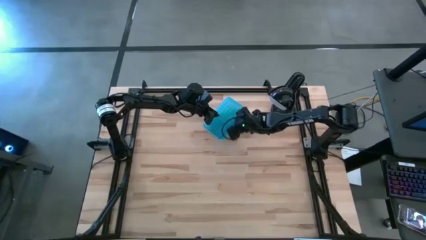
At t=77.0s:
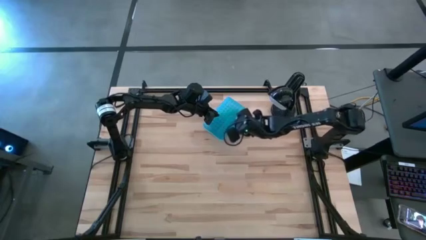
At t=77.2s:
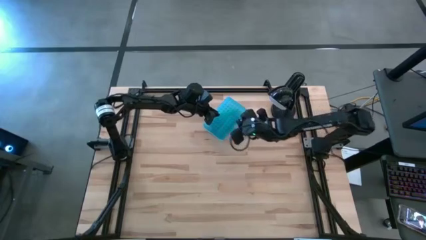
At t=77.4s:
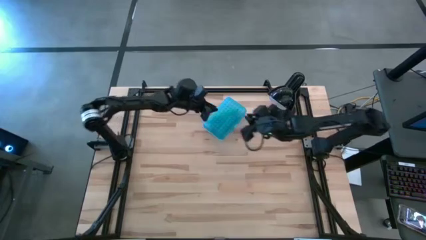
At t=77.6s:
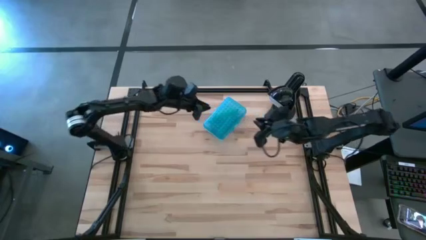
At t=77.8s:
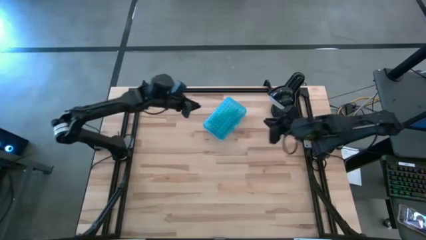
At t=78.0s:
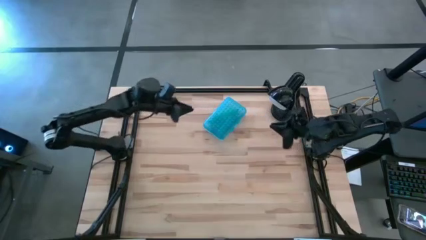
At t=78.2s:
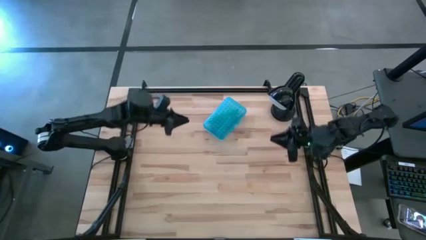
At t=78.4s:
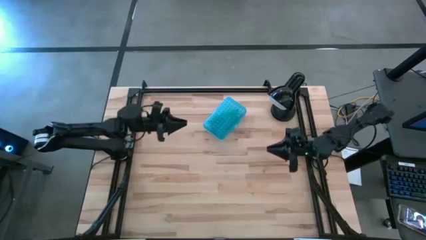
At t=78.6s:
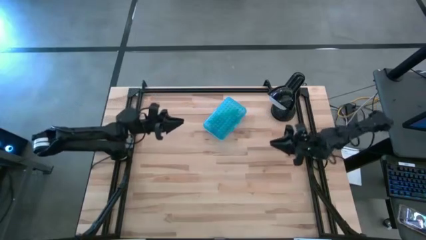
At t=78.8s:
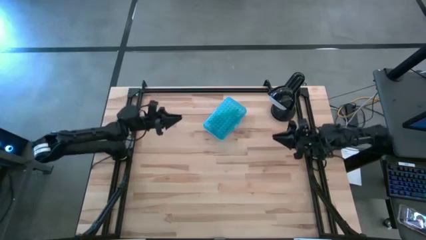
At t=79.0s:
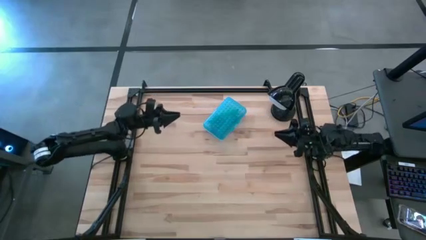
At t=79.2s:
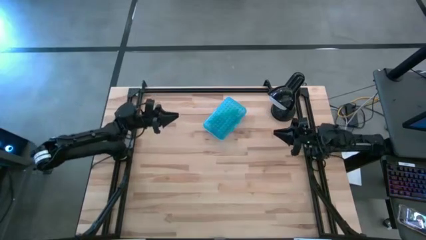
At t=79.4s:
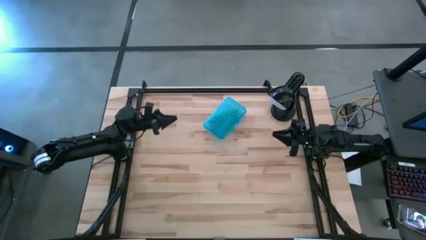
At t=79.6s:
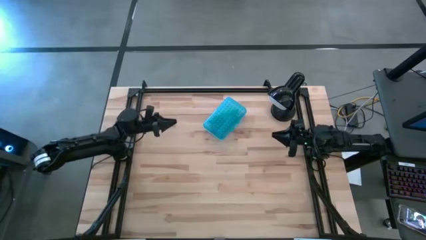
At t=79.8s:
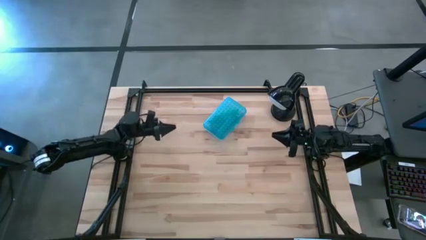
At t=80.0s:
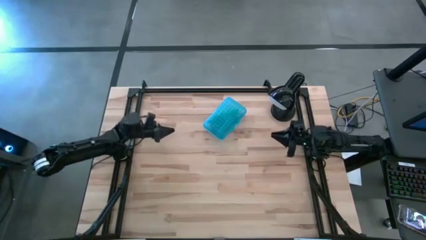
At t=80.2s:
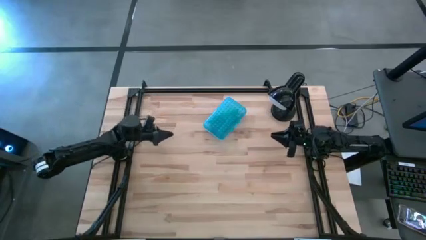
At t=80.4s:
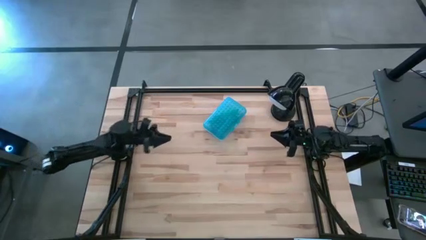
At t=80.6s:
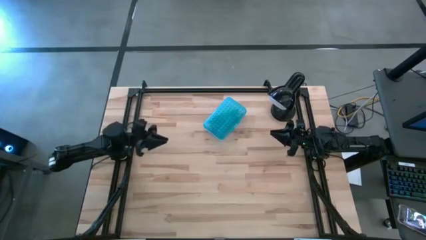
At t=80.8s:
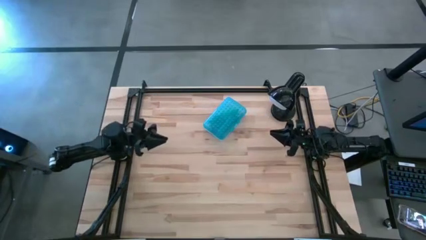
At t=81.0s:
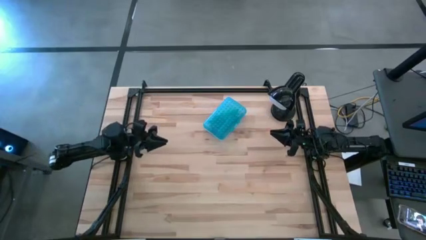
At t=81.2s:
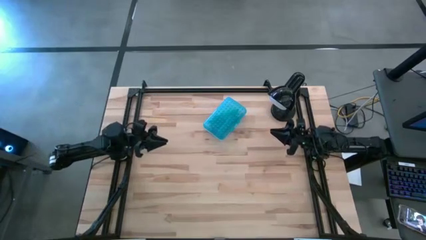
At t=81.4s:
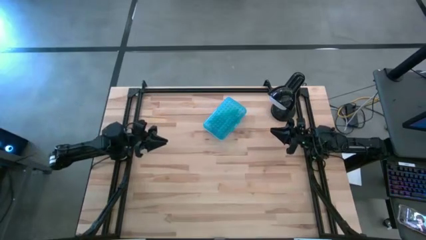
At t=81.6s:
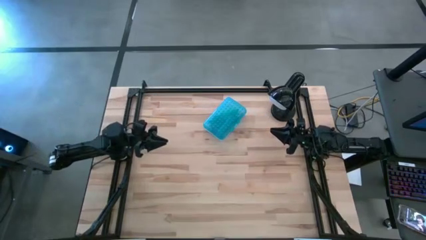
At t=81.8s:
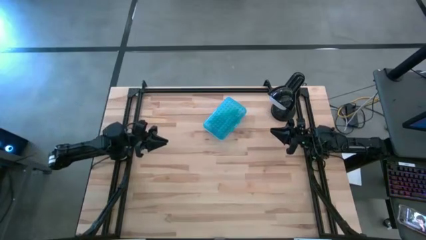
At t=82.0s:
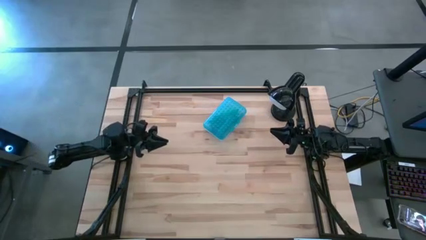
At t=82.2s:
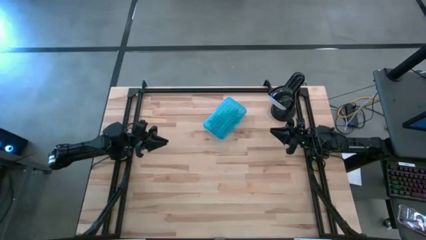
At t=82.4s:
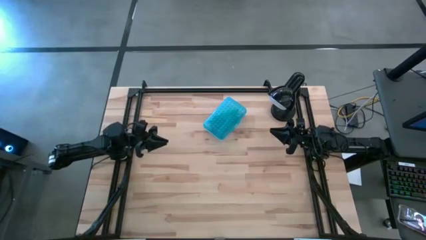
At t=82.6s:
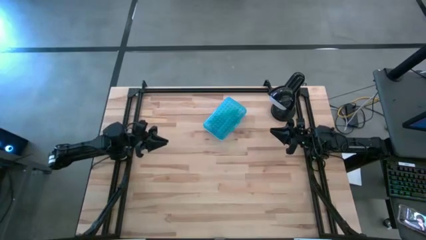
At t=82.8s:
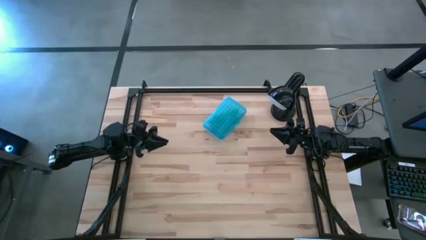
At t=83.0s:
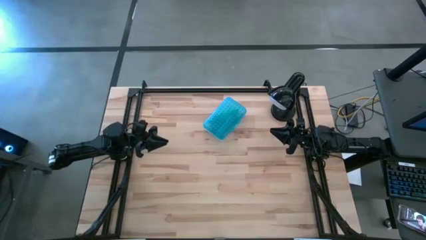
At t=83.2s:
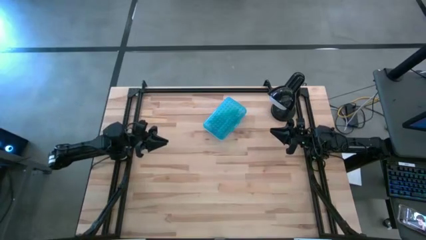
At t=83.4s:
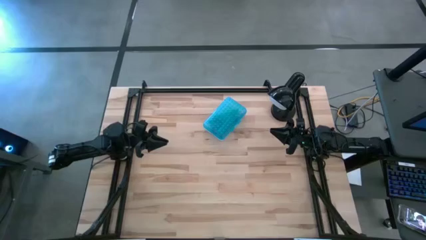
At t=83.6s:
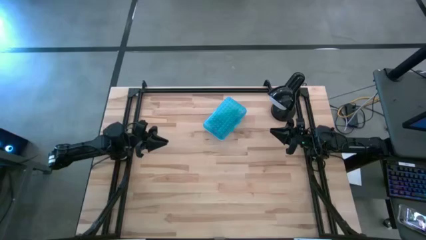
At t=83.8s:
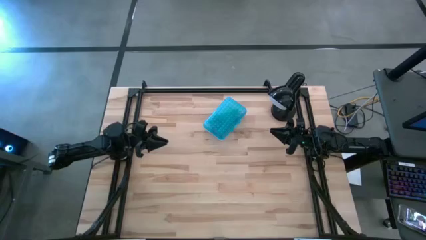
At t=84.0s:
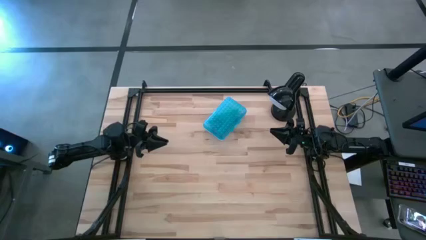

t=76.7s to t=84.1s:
Task: Pick & place school supplies into a supply box
Return to Home Position

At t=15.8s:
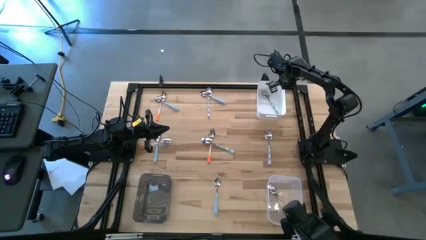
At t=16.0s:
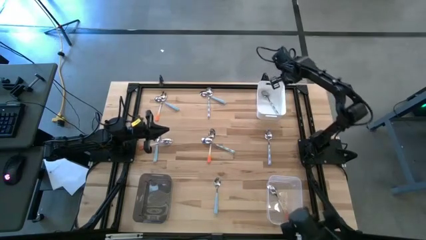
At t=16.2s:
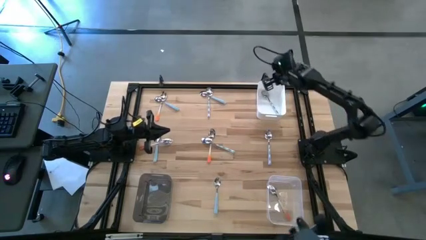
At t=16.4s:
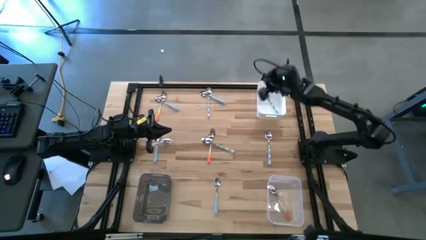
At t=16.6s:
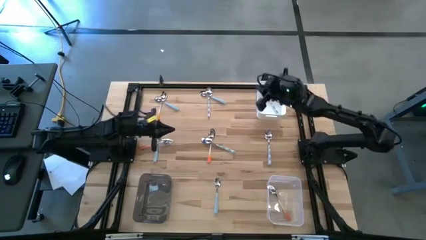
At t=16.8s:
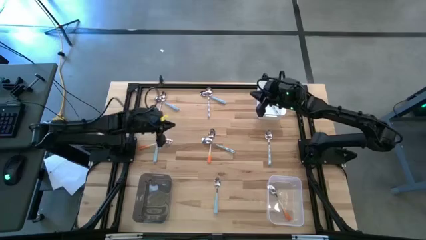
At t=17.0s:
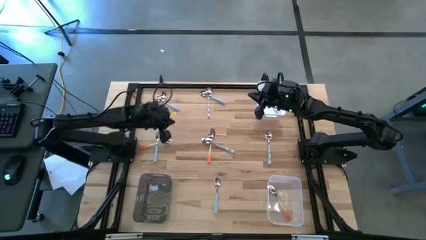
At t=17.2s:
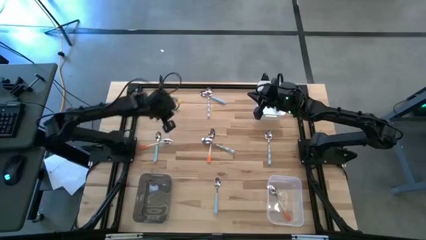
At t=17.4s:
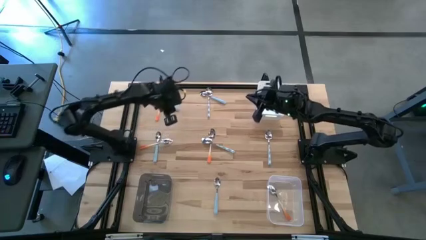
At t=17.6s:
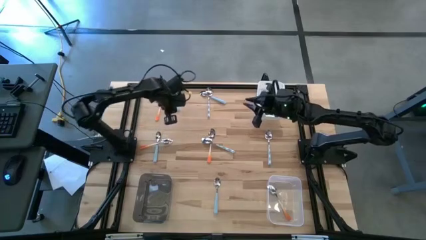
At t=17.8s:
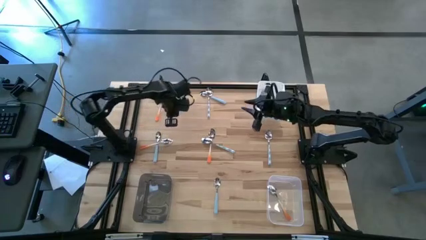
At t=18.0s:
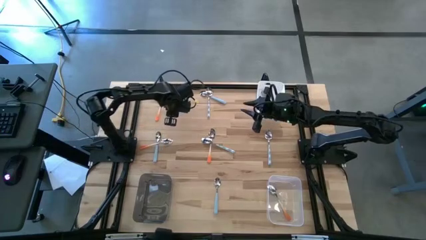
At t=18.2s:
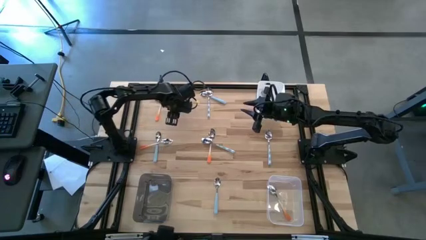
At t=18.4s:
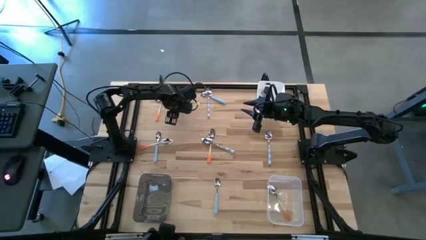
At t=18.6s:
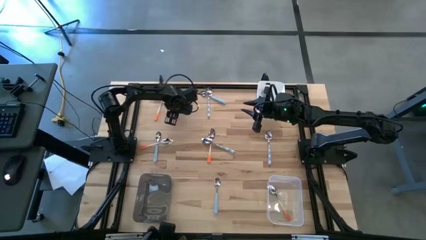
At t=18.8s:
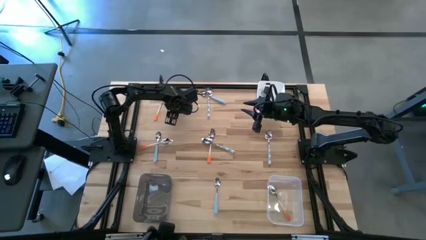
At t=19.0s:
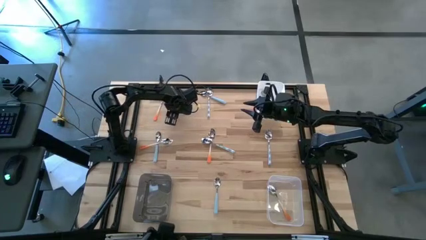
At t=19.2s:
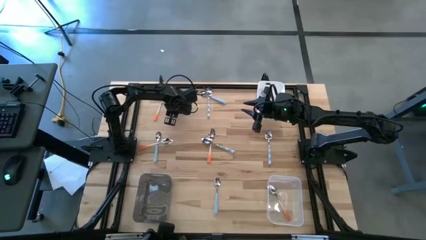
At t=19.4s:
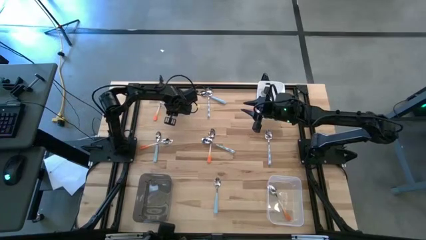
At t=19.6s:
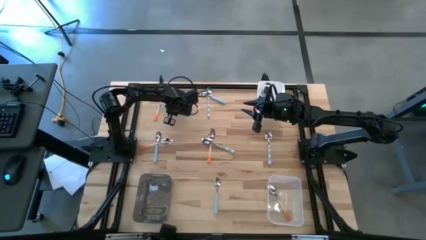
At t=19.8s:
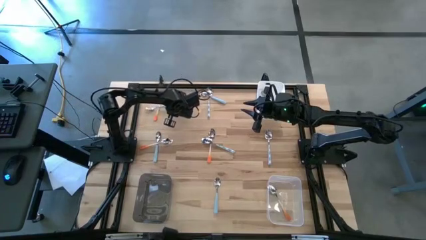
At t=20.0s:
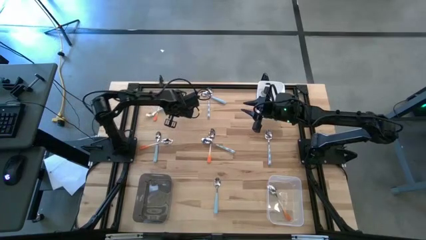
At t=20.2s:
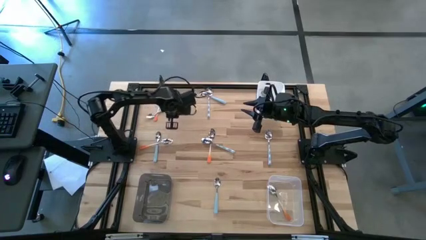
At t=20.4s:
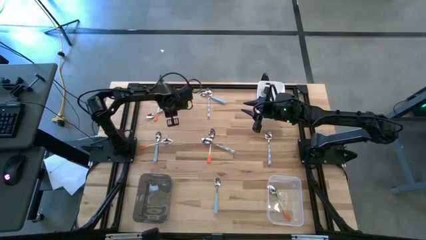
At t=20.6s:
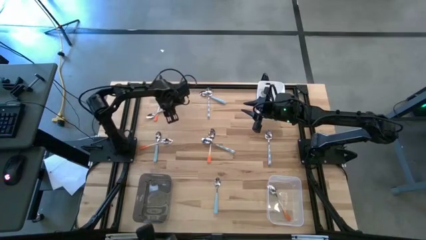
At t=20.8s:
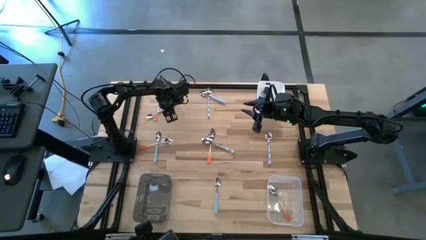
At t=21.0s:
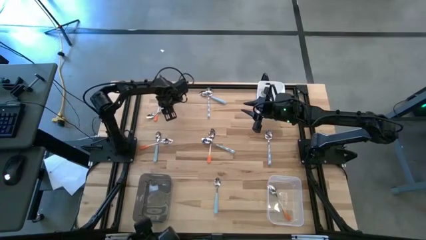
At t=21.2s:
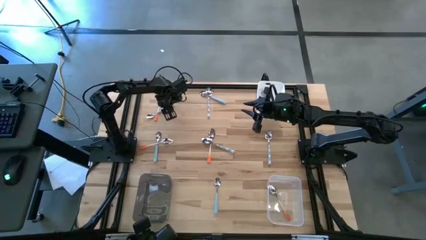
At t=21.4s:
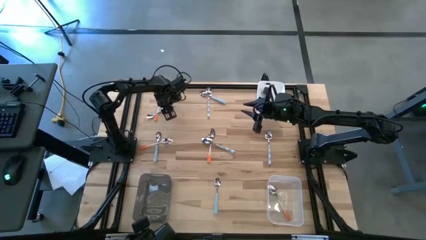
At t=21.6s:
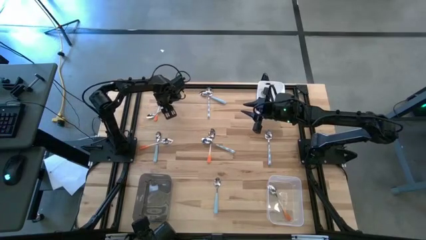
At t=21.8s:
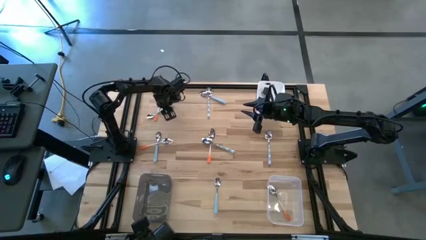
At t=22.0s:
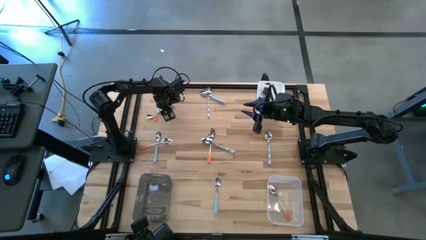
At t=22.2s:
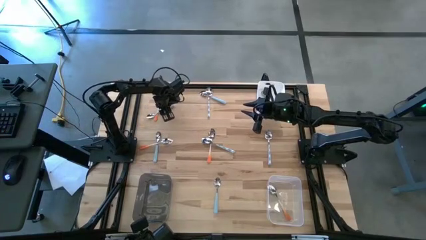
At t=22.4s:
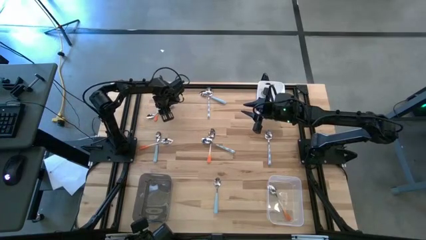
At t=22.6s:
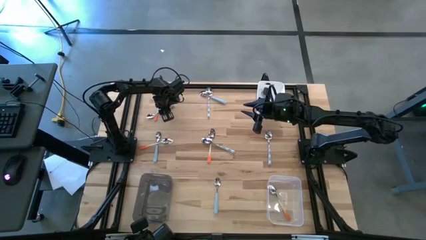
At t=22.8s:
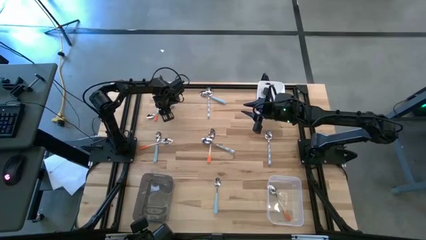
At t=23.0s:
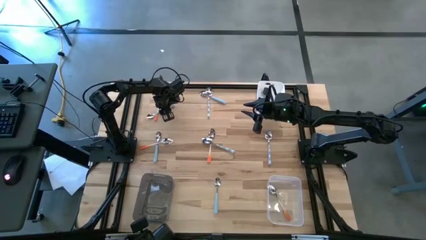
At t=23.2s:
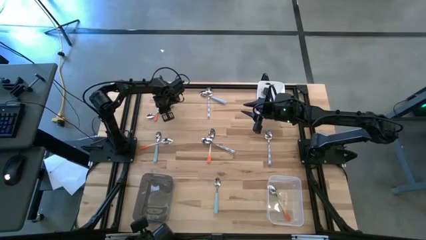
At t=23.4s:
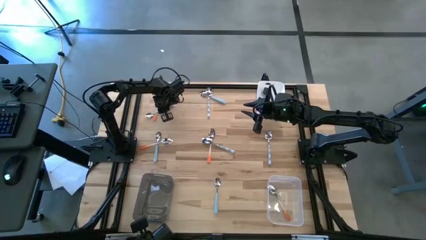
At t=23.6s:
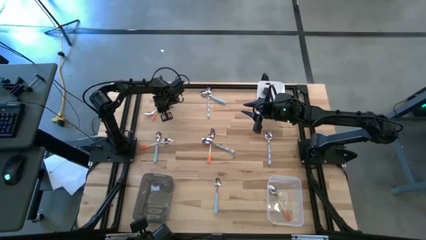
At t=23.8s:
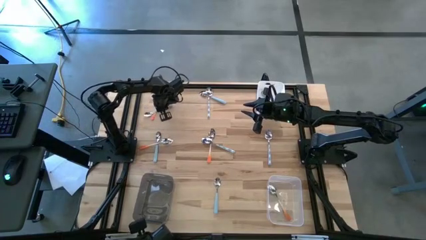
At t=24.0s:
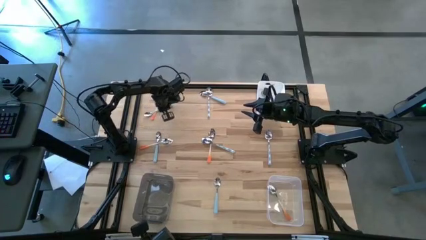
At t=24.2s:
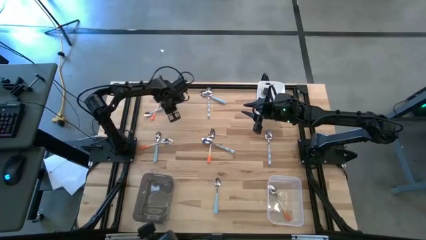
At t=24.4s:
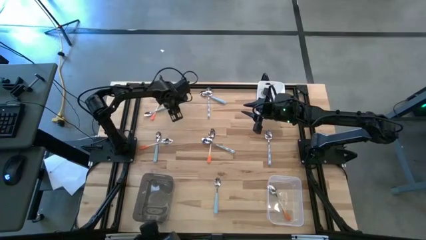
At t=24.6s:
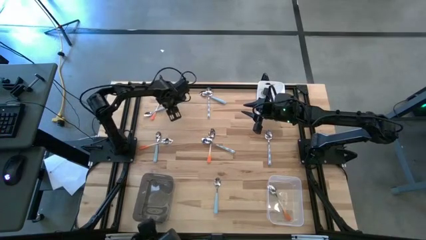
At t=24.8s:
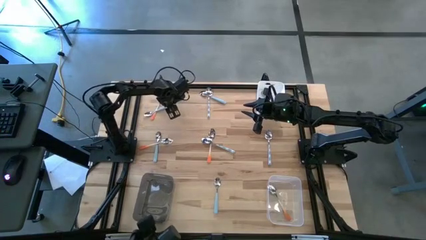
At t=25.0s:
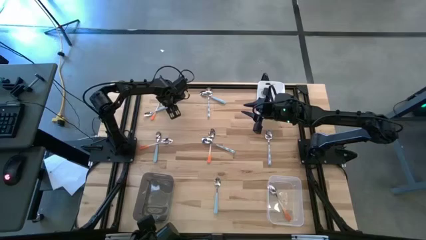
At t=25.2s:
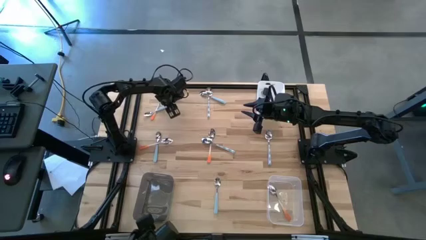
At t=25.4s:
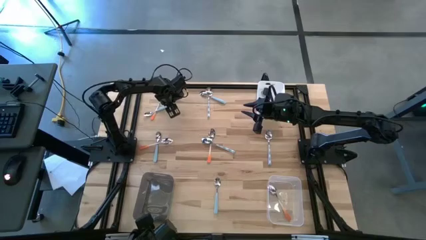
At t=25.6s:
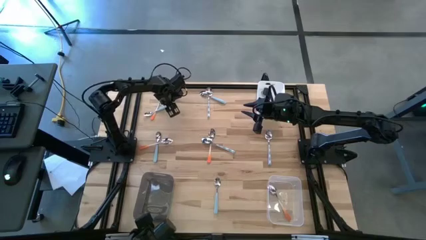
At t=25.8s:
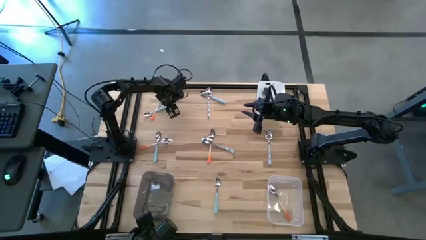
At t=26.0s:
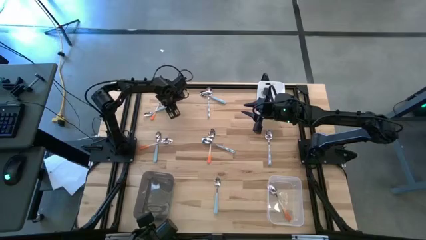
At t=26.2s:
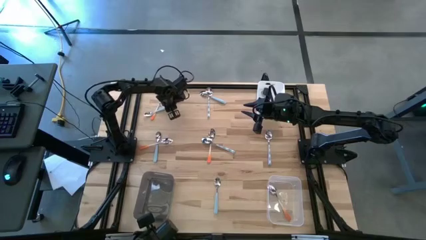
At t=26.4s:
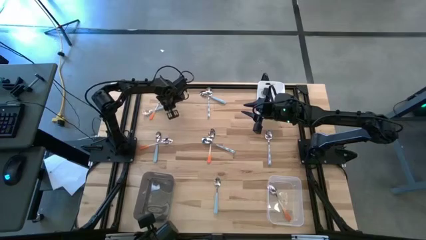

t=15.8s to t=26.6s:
Task: Sort silverware by color (type)
Put the light blue spoon into the black bin
